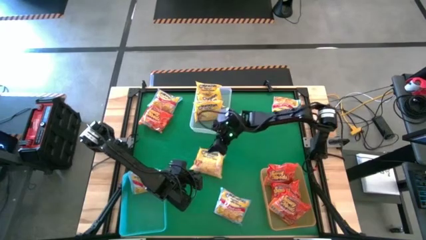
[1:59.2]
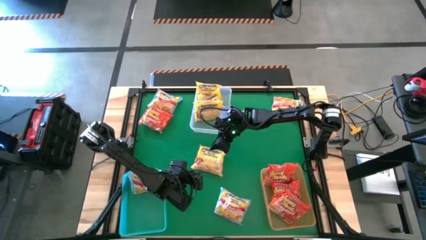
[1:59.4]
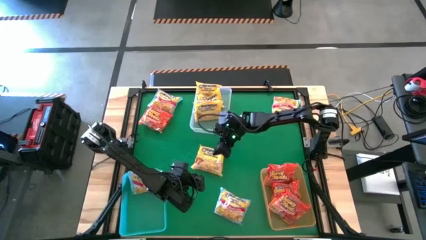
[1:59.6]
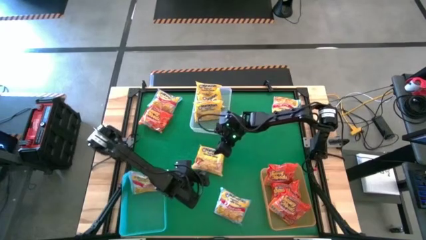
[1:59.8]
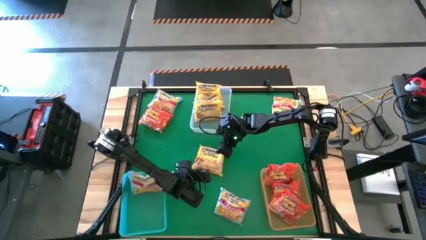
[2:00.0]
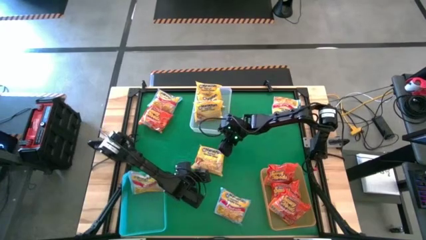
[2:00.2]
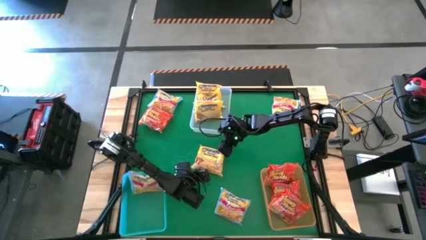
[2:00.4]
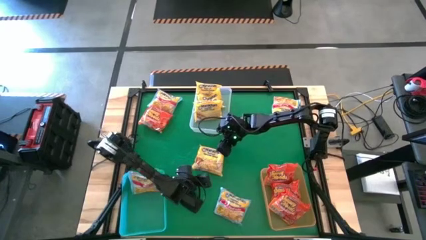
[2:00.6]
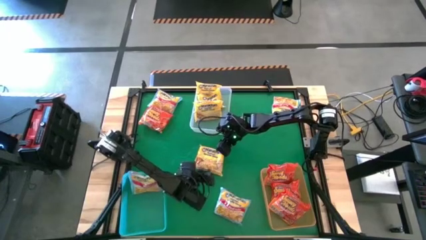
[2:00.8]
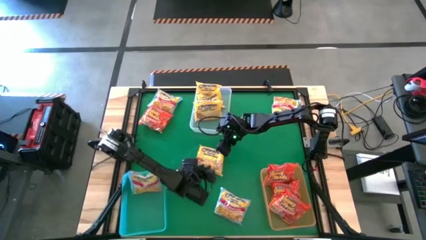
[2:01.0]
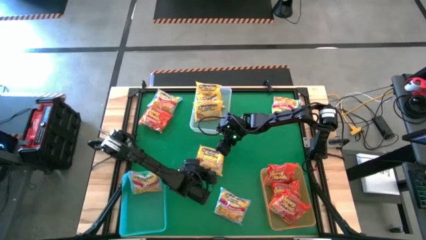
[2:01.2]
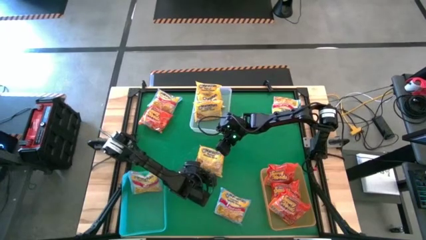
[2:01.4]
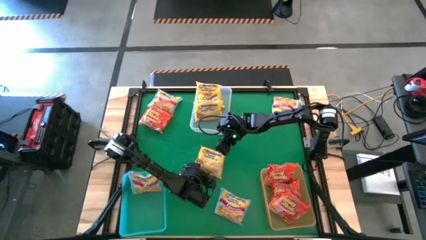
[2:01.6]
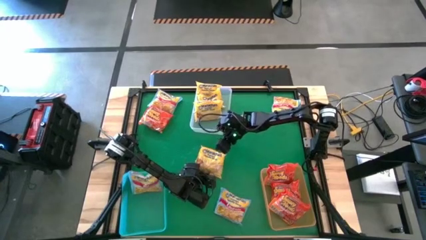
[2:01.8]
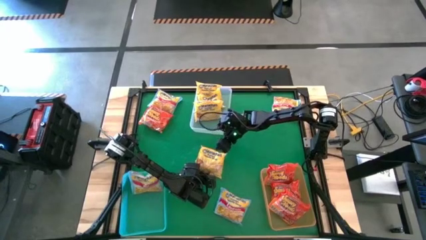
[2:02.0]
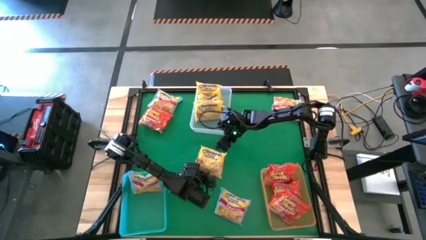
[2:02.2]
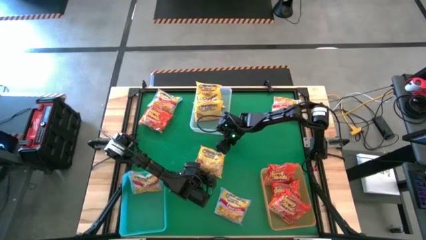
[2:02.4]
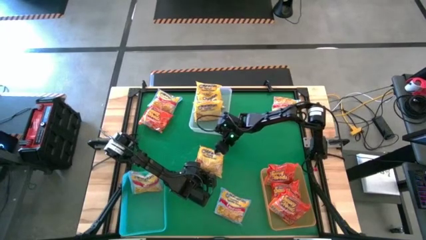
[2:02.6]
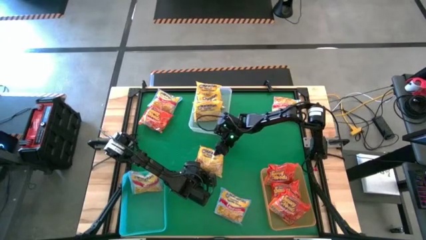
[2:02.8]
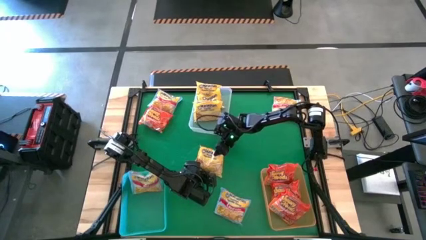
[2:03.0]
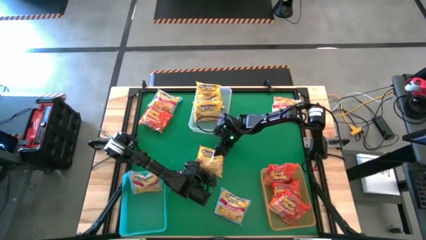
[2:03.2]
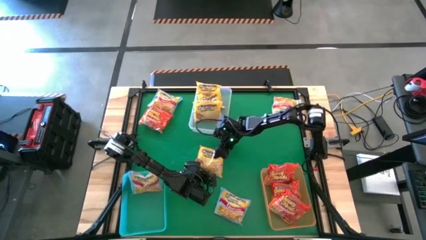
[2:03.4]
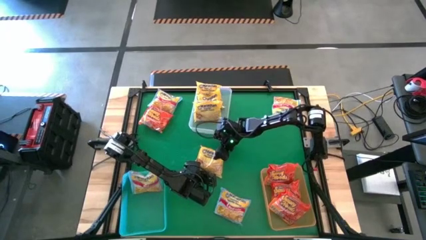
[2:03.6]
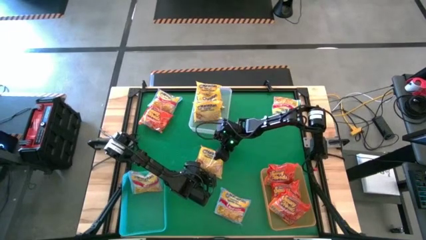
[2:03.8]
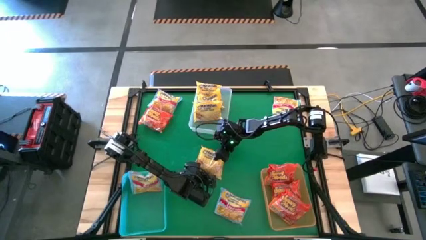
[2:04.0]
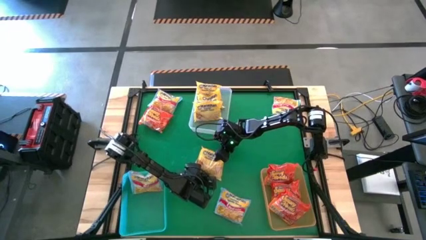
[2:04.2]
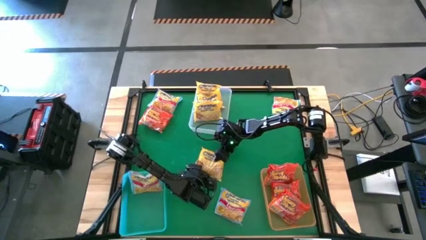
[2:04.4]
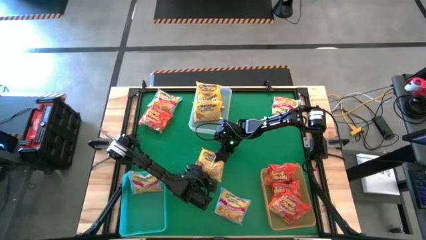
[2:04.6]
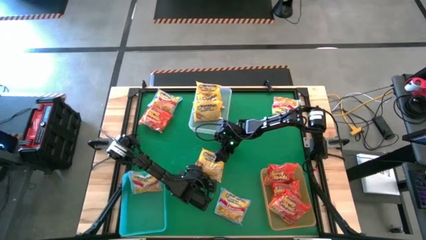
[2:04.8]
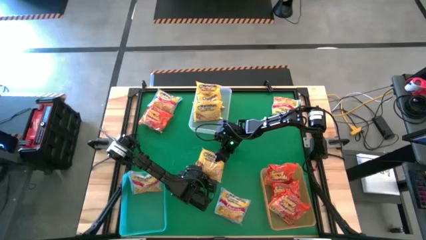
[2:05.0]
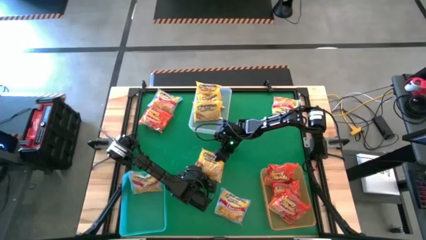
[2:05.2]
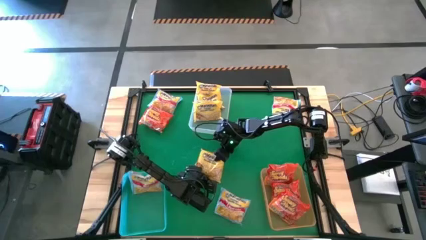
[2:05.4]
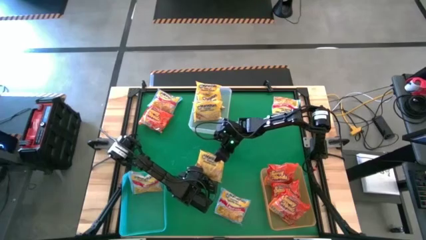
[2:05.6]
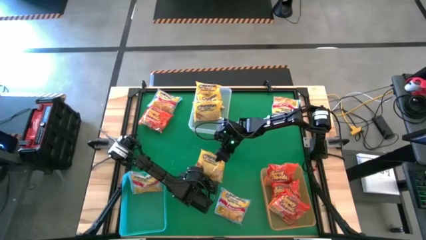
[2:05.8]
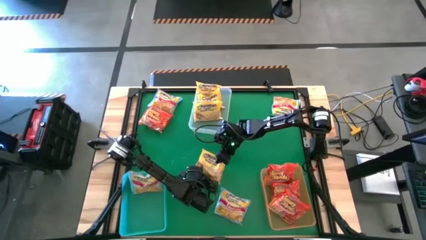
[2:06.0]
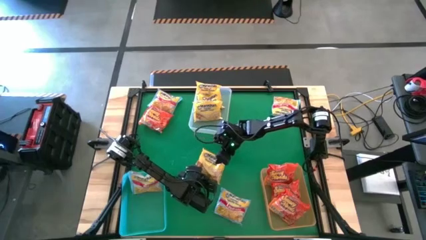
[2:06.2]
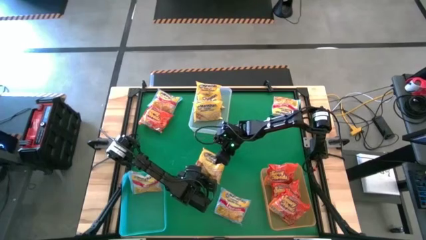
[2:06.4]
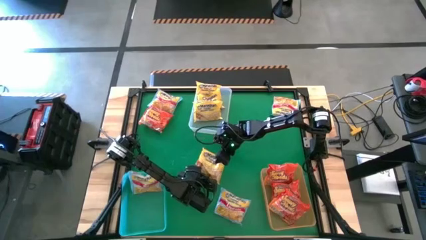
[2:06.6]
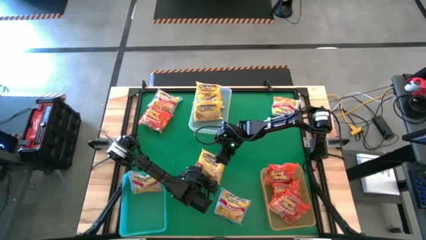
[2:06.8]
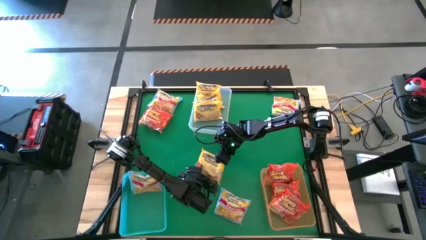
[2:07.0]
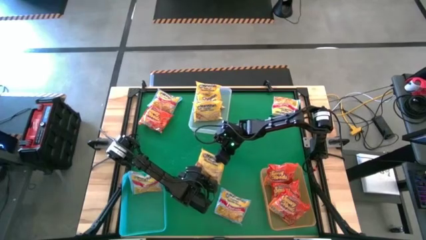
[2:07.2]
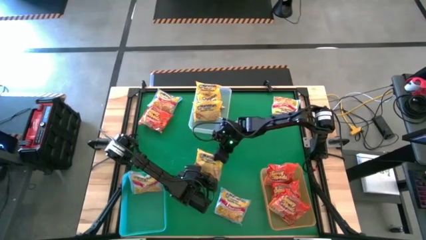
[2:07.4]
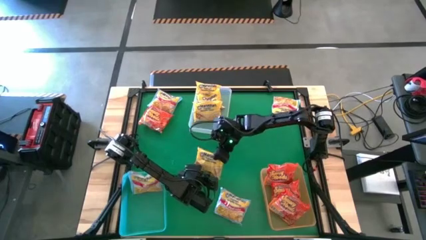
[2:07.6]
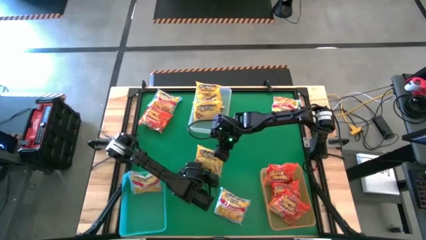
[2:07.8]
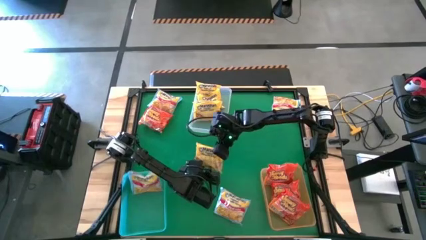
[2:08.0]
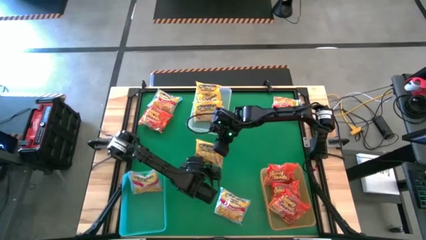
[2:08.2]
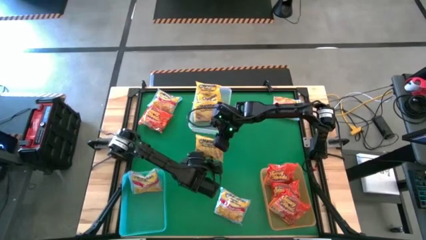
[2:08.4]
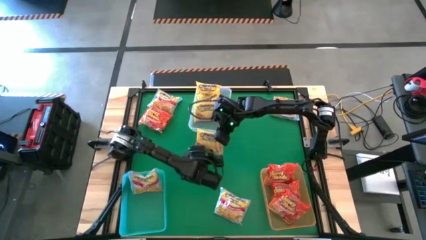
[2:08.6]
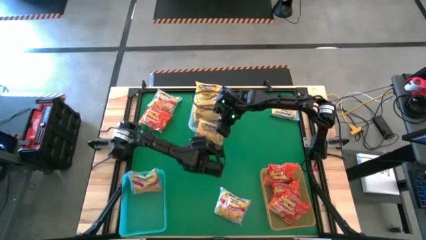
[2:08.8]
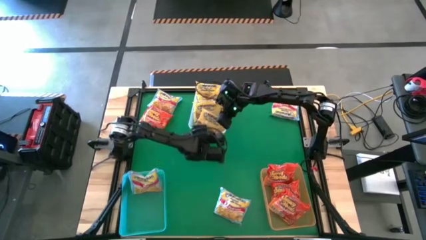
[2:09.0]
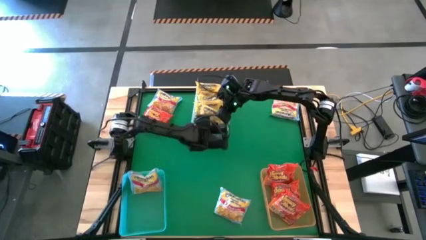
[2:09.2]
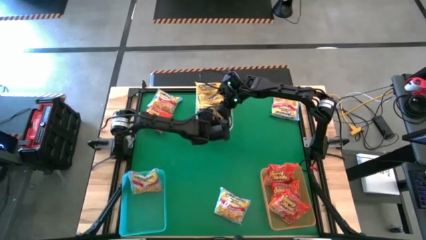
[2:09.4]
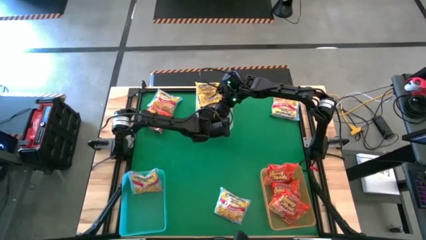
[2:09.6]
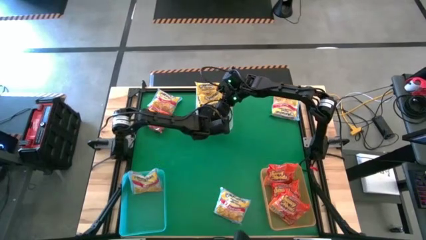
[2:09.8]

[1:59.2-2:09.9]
Task: Sort Maruchan noodles
Put the yellow noodle pack into the transparent bin

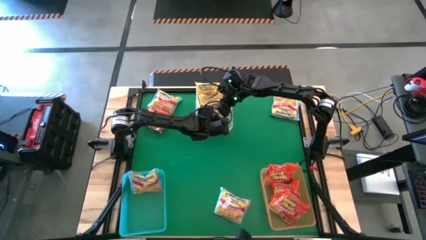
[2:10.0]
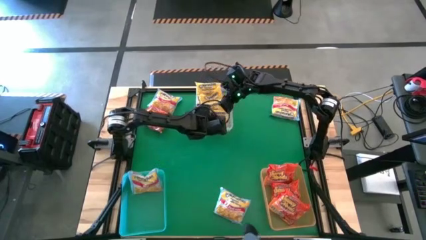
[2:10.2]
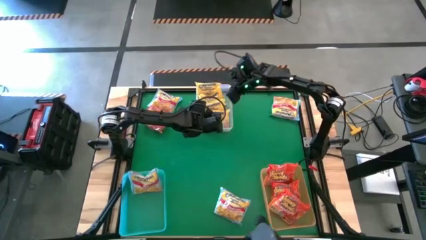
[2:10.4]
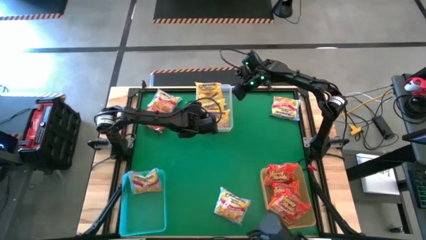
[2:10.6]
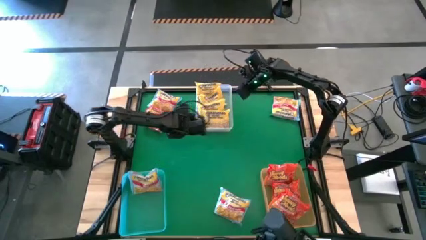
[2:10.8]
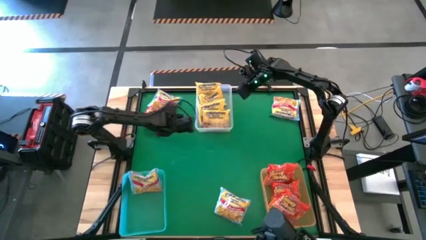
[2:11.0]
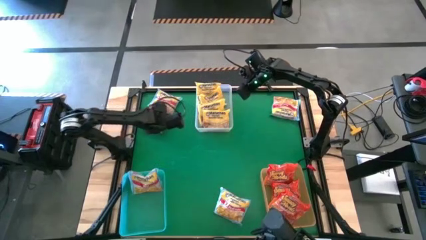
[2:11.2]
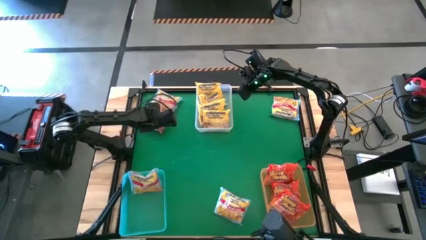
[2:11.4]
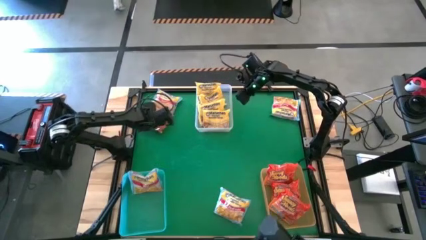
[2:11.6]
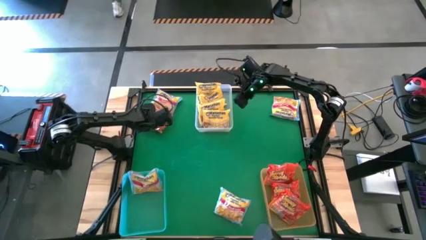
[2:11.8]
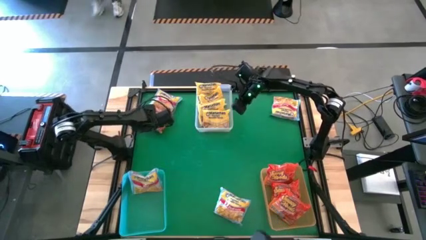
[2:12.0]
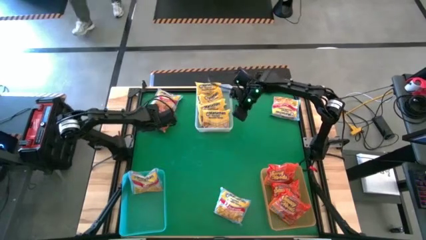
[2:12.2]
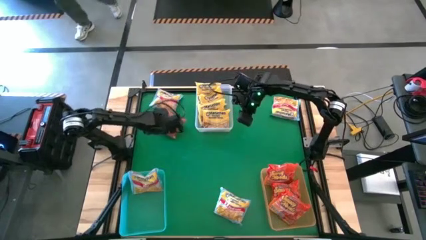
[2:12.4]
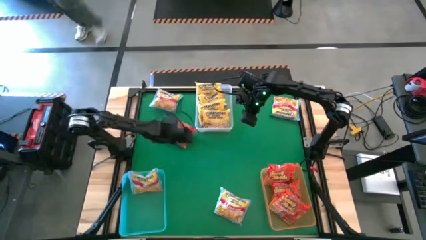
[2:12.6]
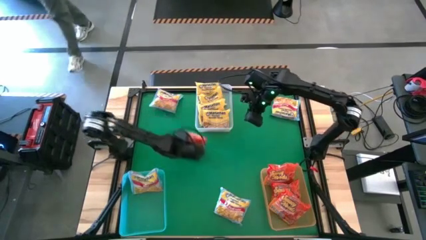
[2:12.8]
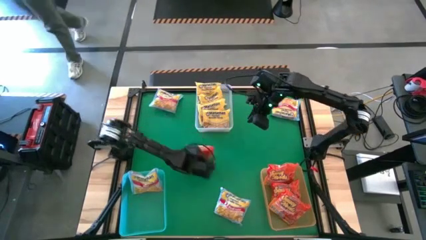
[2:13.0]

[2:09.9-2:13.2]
Put the orange noodle pack into the orange bin
